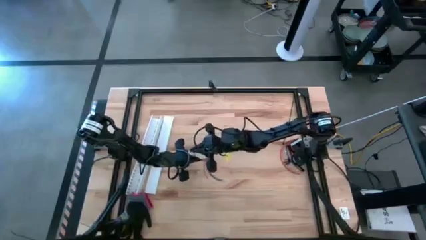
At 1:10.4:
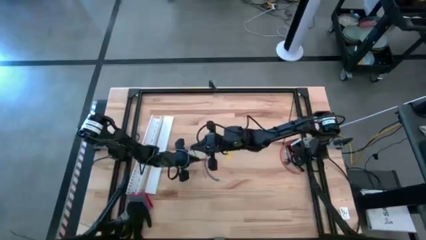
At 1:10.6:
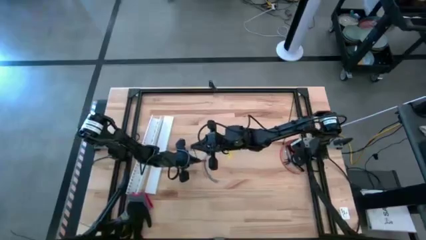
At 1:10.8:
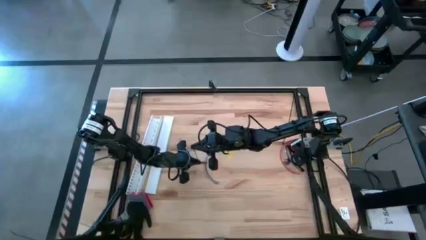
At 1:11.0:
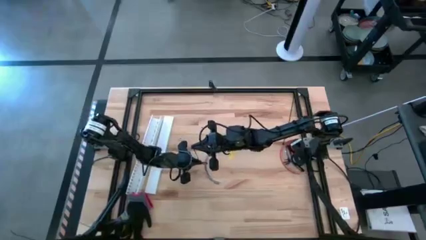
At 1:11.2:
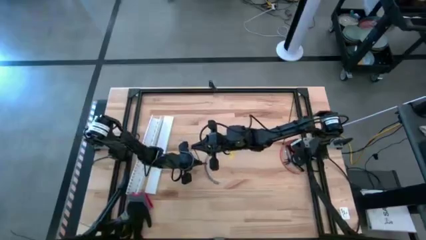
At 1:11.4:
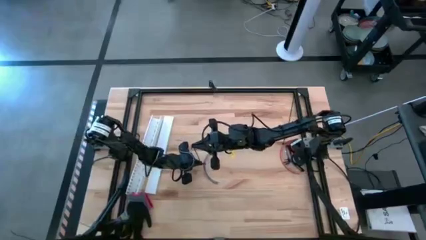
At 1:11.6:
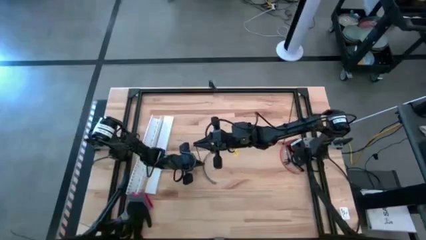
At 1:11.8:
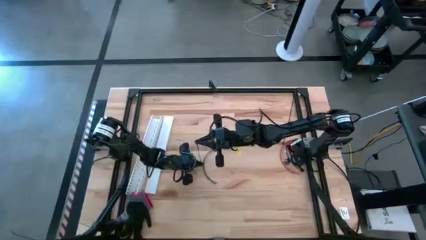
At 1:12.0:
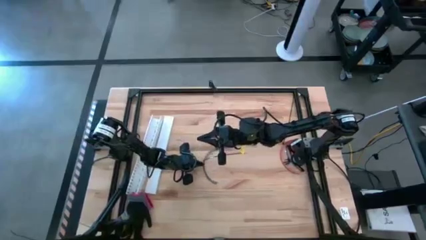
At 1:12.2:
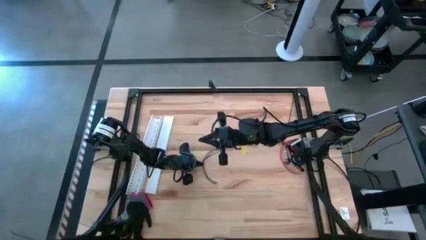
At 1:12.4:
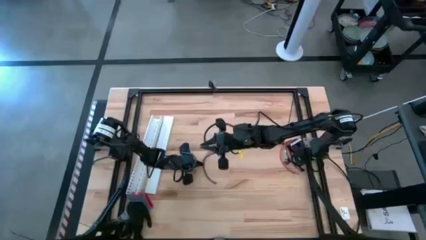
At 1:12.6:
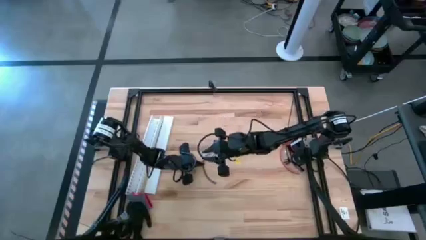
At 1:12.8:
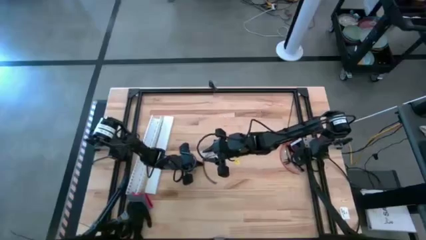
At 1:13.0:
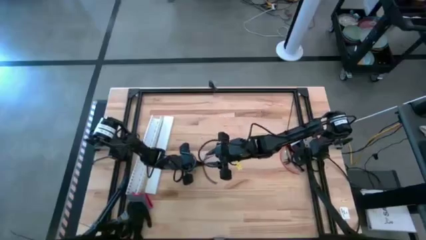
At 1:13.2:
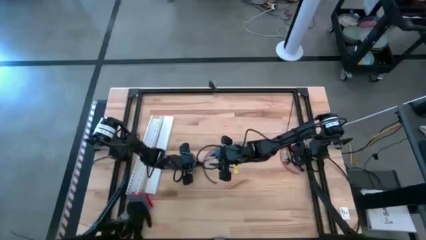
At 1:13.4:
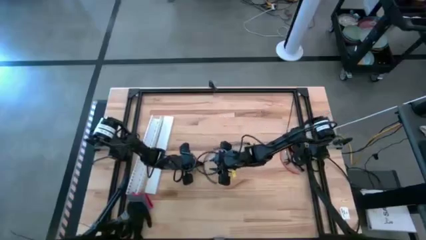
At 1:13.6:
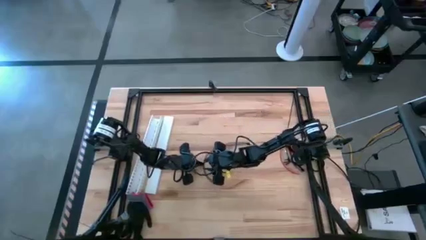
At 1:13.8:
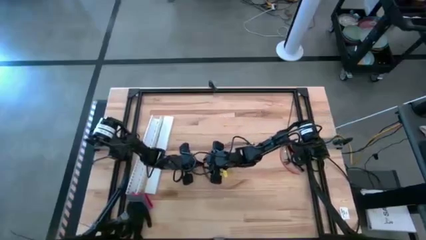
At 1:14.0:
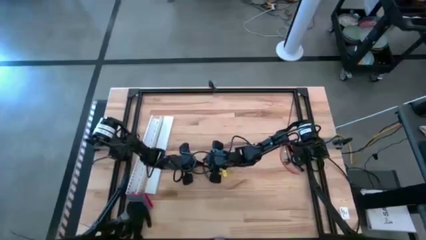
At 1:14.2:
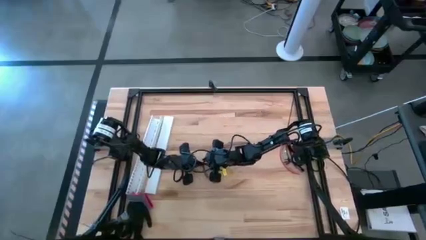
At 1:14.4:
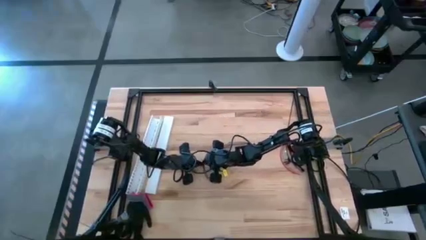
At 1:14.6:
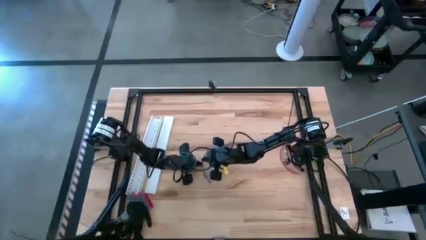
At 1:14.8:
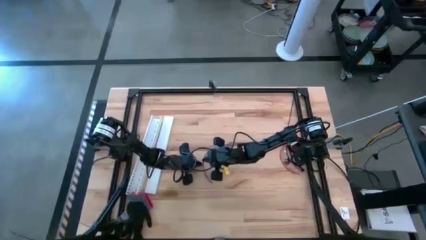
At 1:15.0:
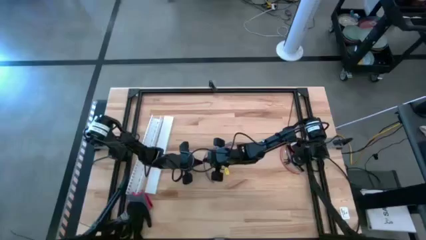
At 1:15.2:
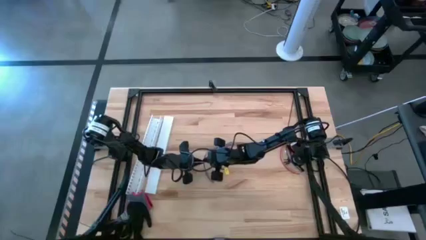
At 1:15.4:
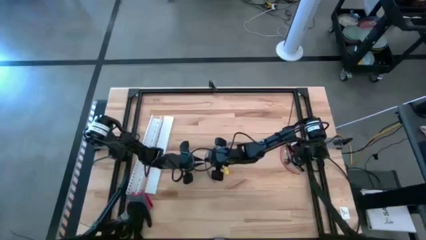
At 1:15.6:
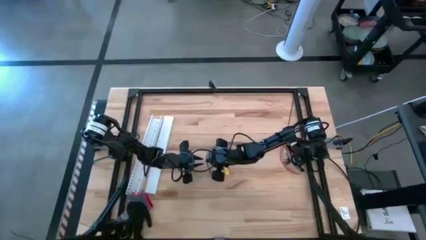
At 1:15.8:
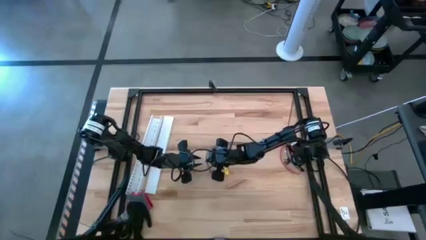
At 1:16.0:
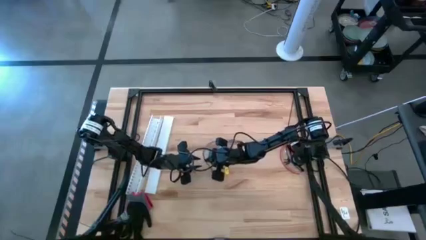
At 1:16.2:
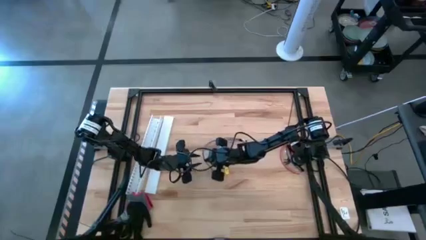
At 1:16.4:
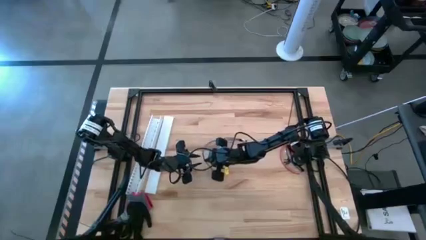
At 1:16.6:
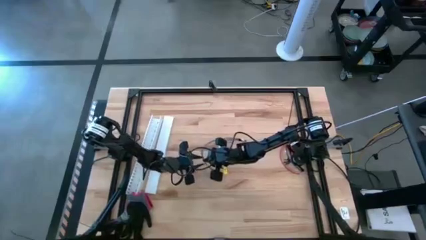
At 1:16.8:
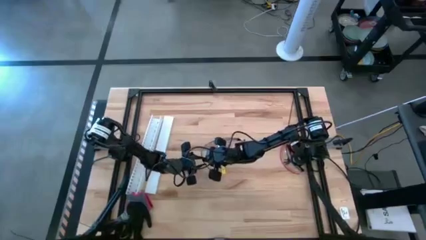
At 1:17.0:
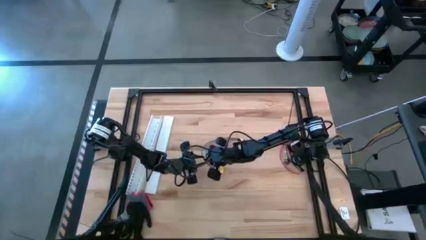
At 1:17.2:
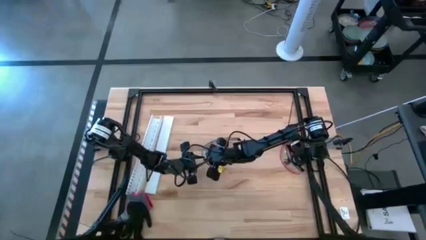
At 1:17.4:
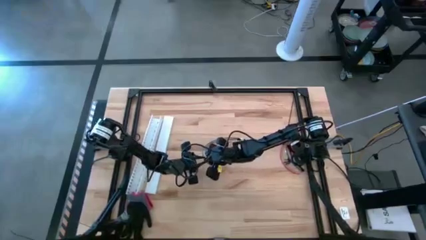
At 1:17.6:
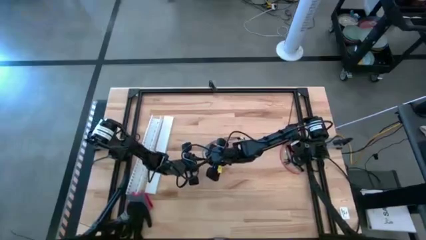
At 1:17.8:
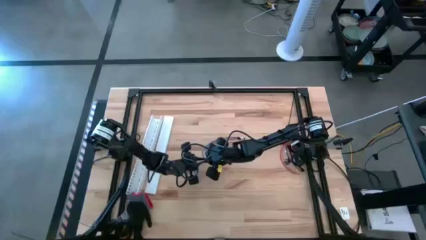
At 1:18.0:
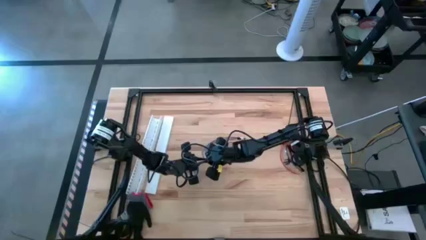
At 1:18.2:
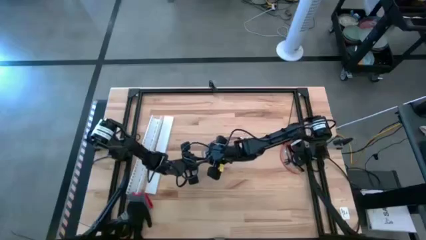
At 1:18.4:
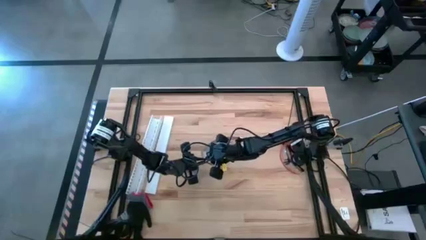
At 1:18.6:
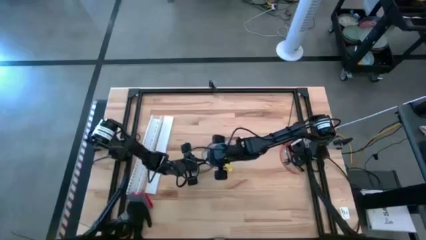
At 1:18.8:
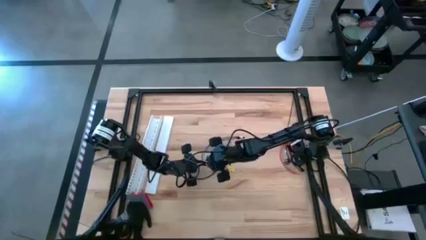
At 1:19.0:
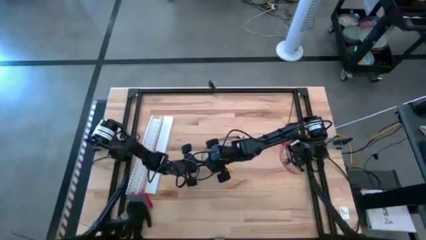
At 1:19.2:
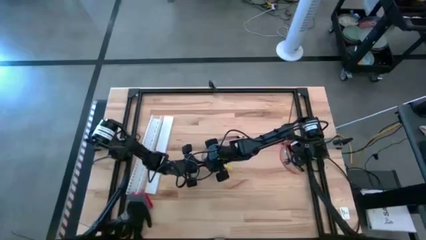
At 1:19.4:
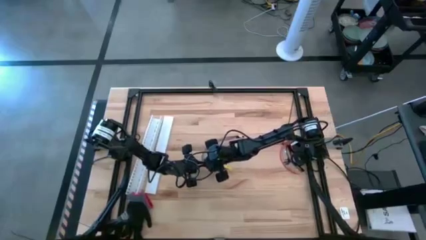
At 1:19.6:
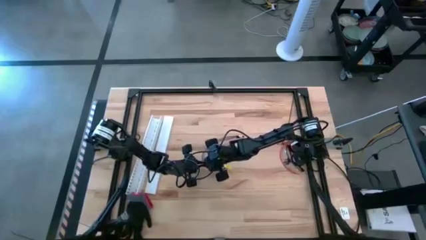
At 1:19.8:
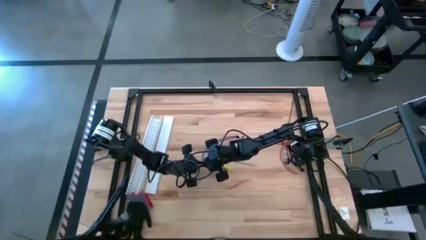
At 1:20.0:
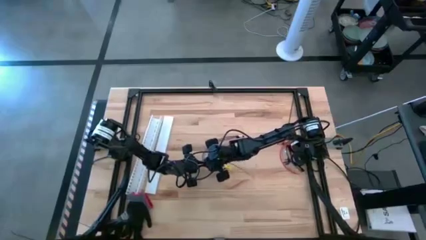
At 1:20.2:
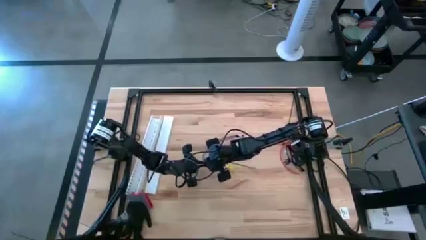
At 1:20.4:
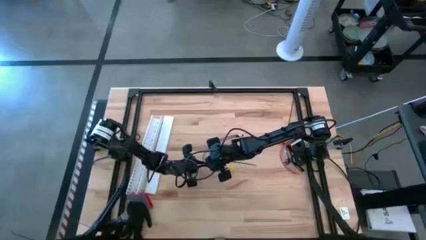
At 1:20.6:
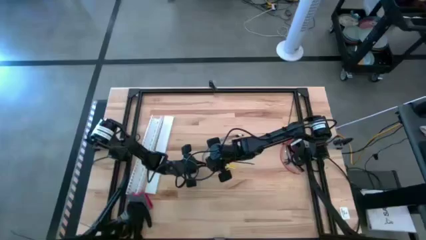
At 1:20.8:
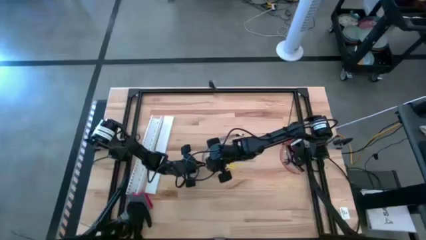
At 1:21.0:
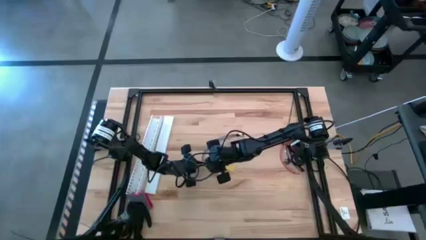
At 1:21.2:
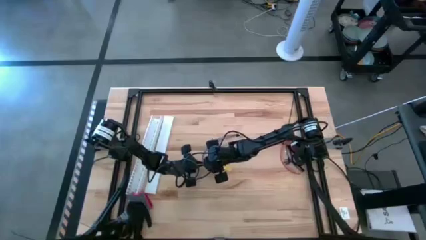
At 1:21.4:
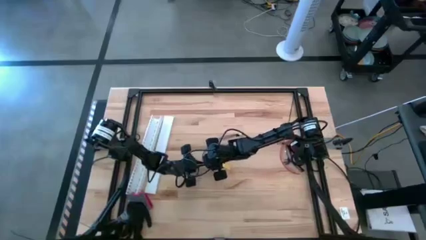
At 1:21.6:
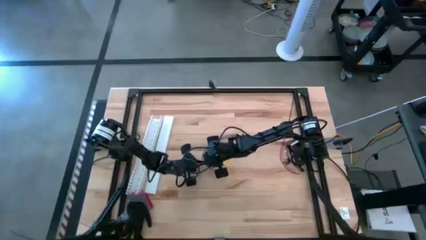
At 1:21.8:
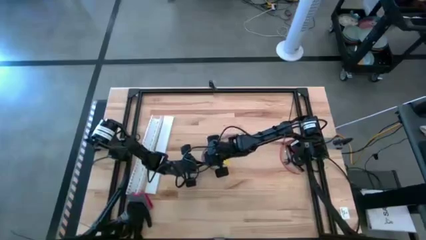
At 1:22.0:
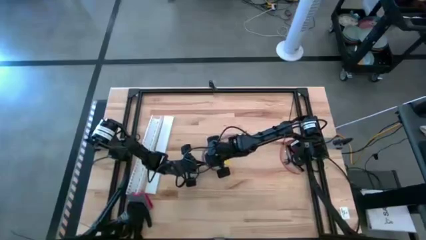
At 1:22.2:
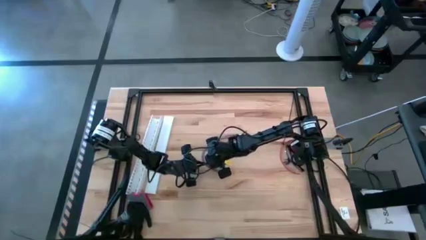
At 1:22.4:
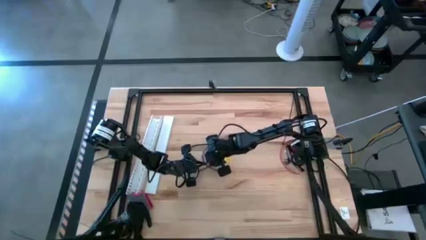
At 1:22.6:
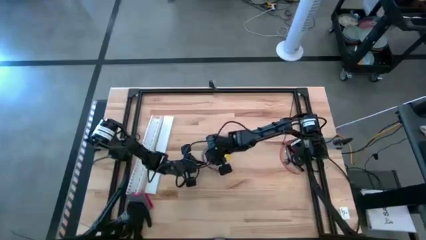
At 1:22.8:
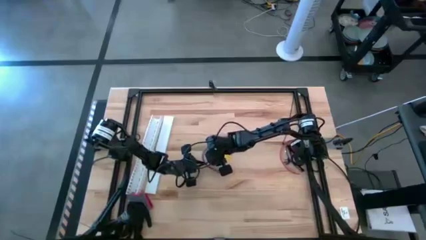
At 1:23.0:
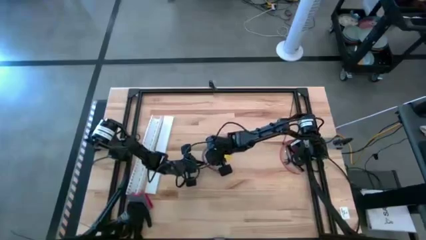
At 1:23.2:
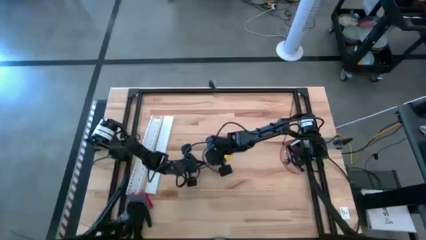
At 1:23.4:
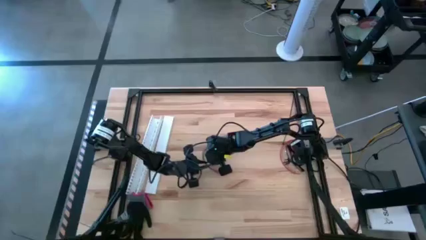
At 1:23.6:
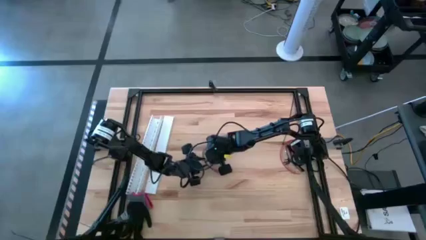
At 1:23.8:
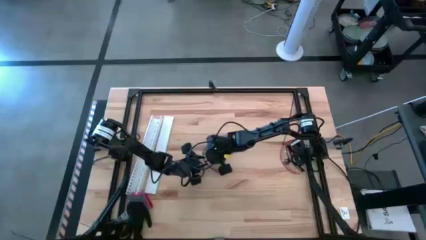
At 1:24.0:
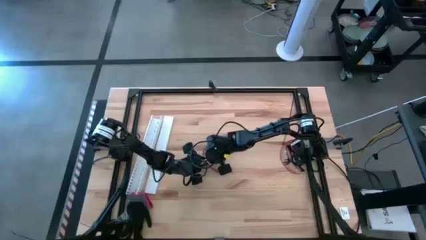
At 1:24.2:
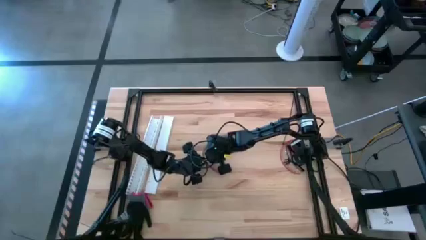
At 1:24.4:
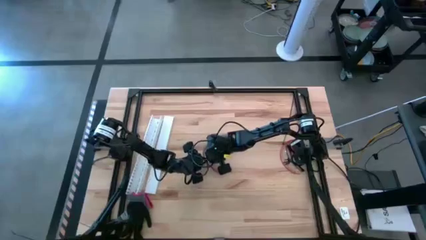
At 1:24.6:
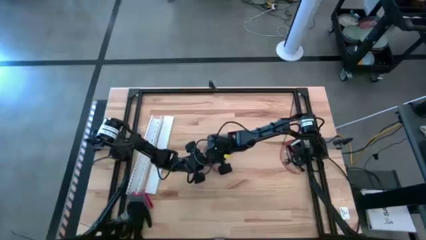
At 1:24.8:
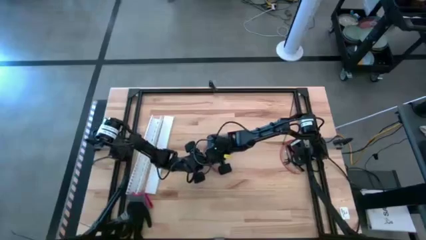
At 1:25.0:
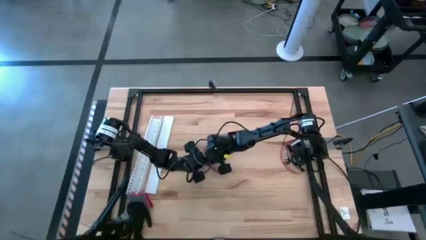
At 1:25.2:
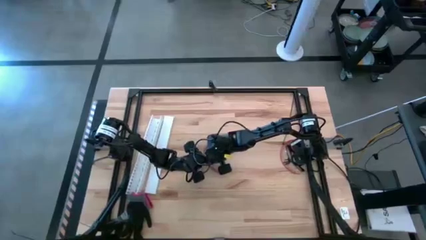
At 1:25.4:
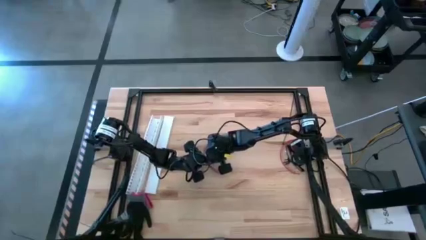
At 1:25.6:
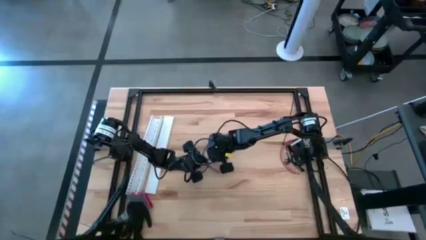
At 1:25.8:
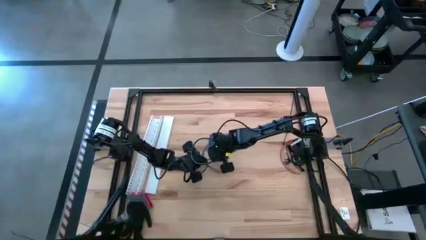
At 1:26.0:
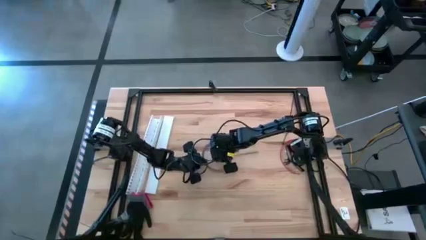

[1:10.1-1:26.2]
Task: Ziptie cables
Wrap the cable wires using bottom black ziptie
